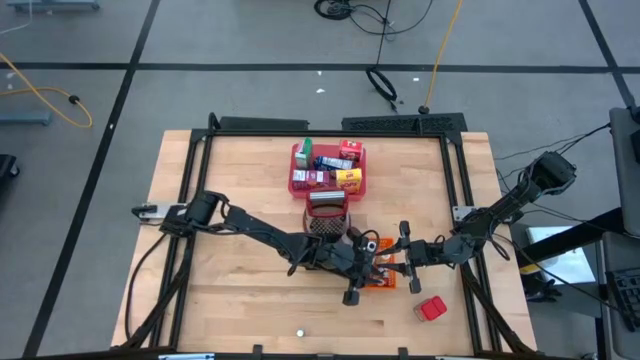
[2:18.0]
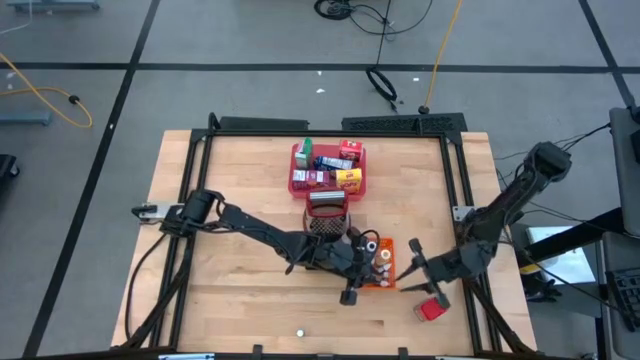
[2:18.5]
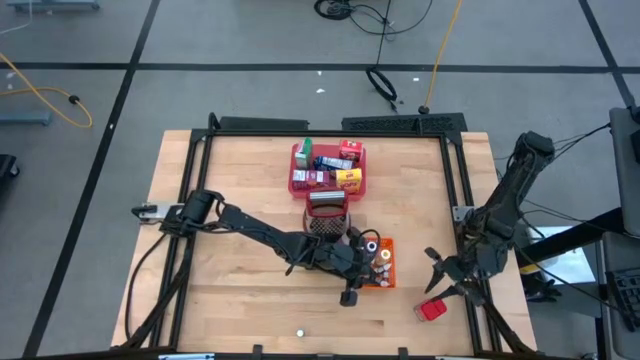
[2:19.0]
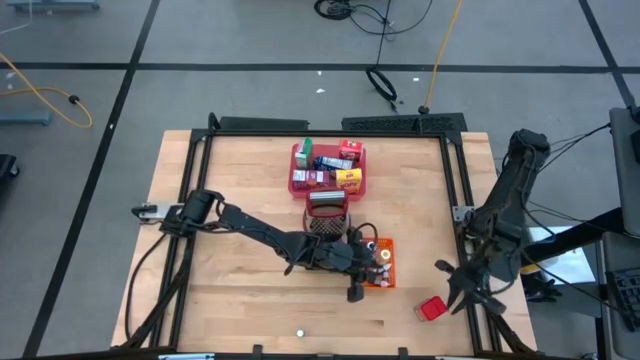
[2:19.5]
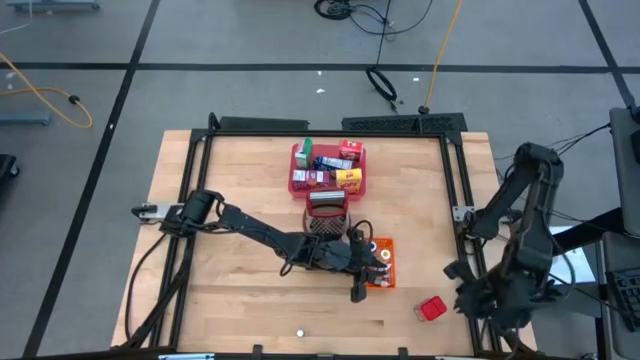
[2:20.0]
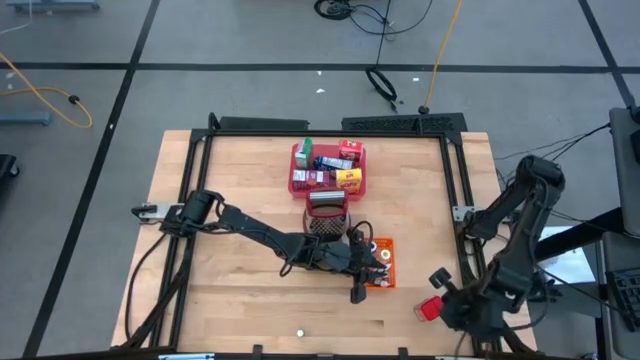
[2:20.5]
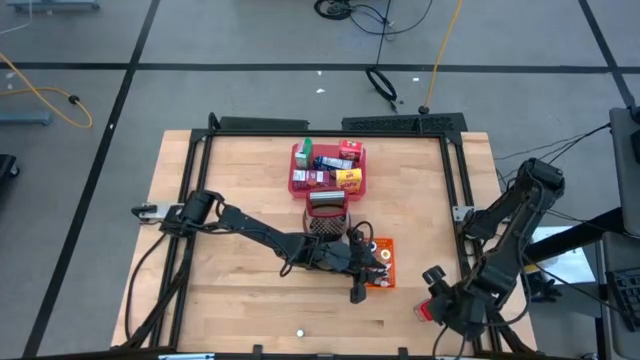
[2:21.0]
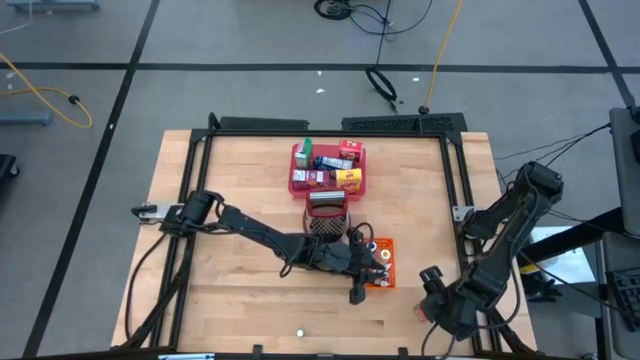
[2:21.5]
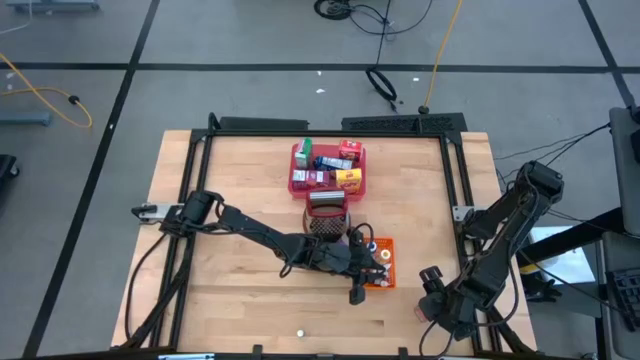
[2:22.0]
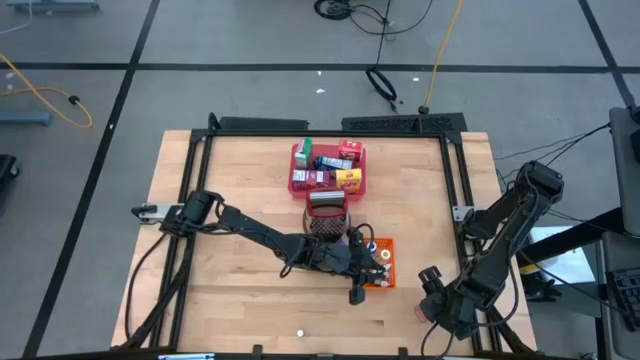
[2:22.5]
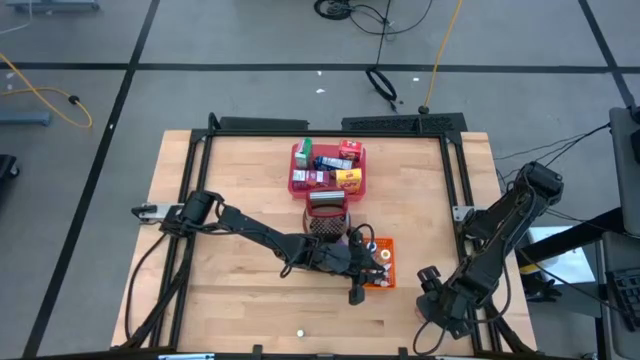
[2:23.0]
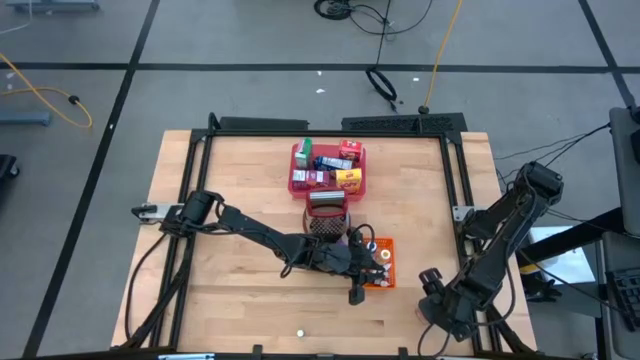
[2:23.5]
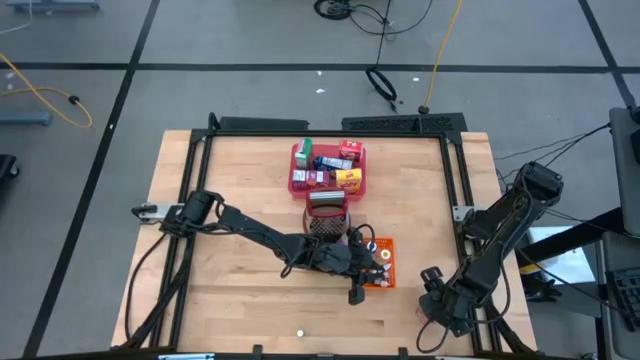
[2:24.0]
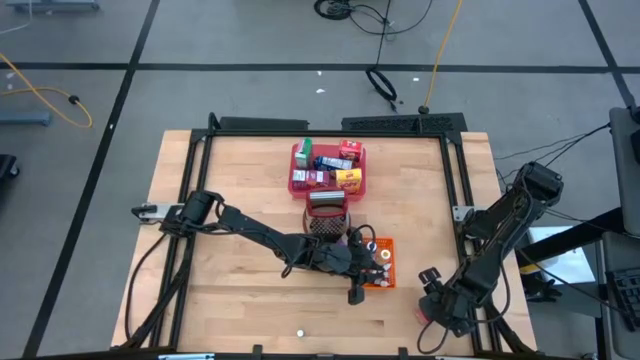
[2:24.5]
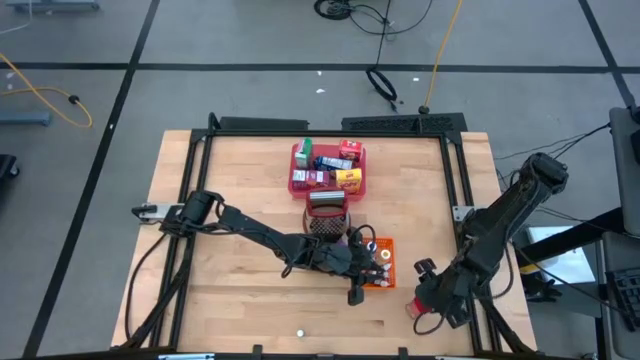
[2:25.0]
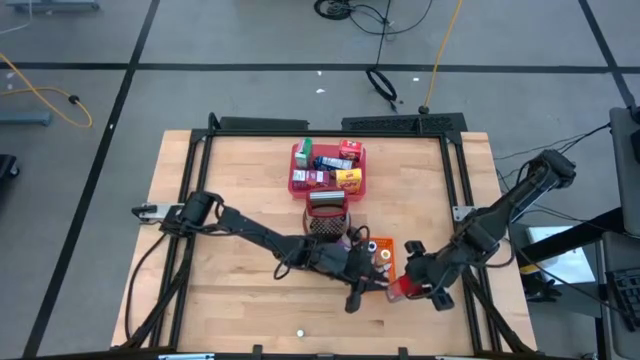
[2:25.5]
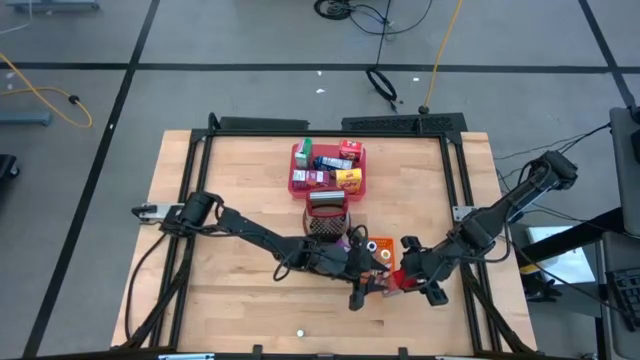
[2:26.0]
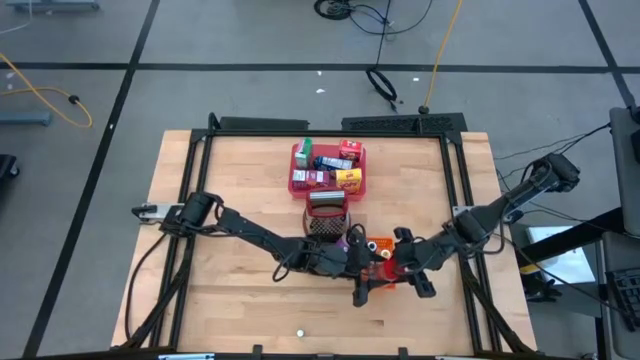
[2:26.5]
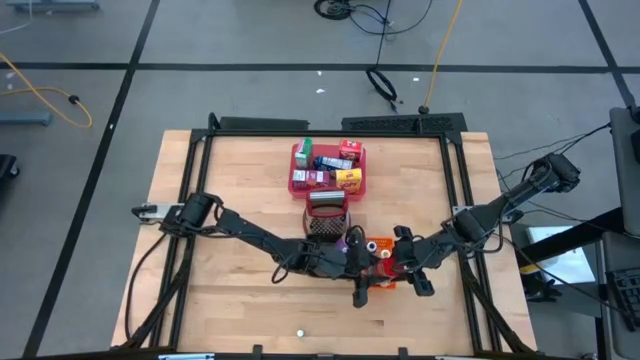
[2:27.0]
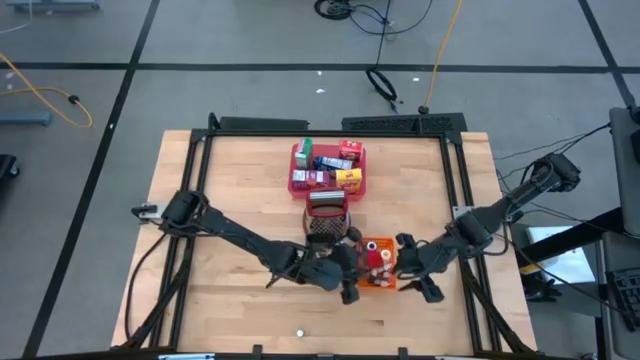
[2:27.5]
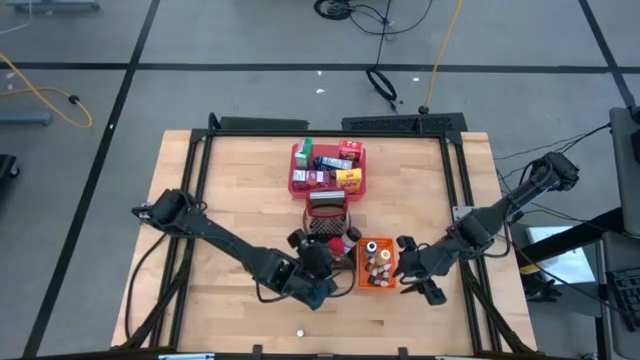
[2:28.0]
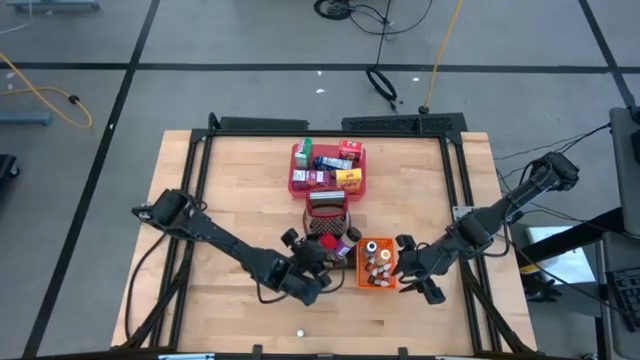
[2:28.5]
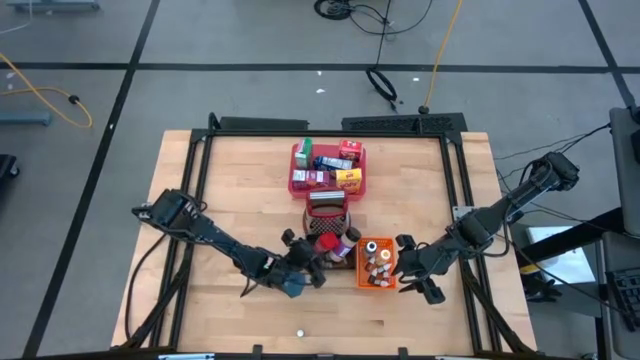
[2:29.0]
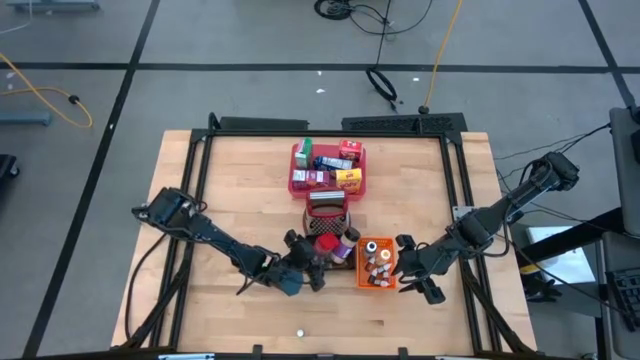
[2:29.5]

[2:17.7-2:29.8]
Task: Pick & Place Kitchen Items
Put the red seasoning can into the black bin

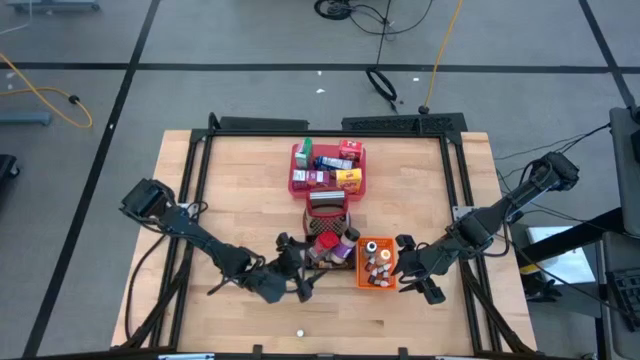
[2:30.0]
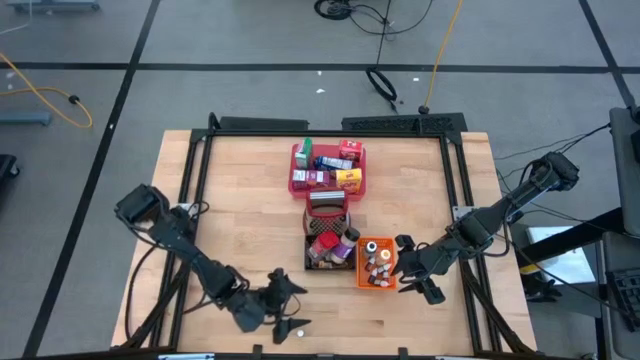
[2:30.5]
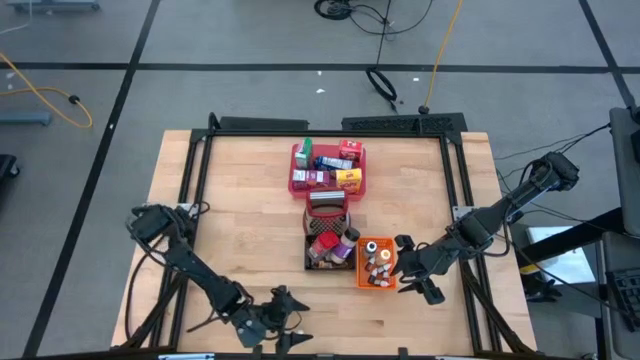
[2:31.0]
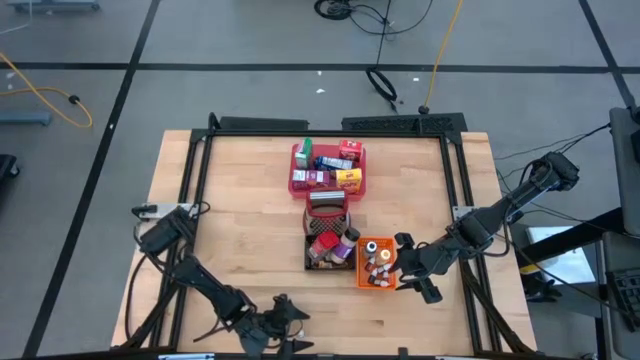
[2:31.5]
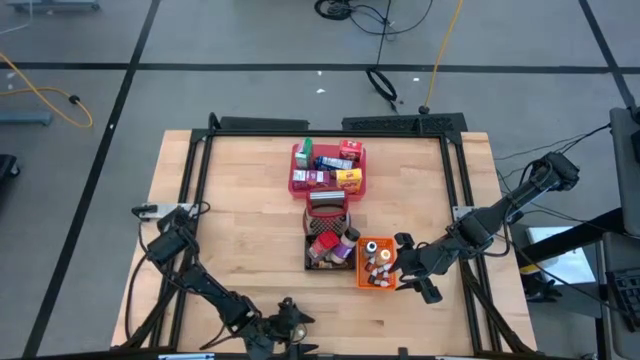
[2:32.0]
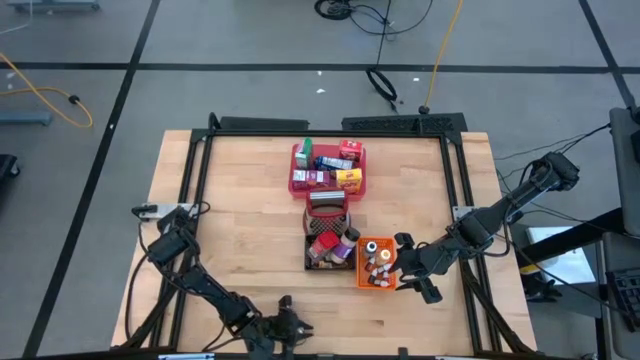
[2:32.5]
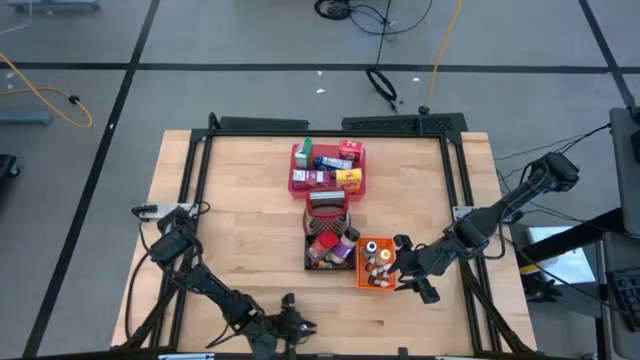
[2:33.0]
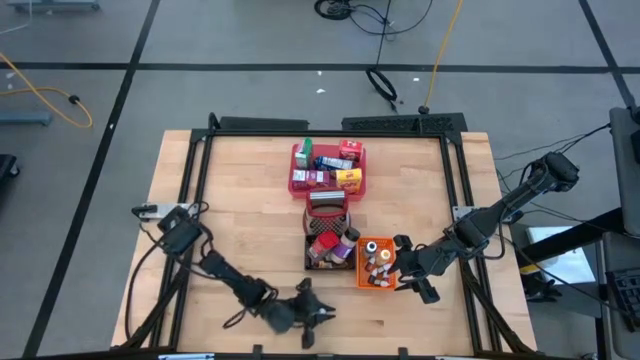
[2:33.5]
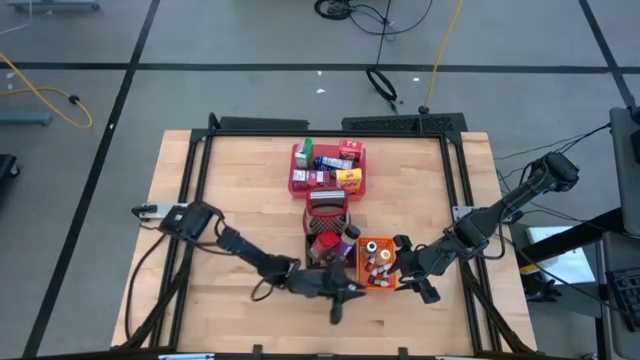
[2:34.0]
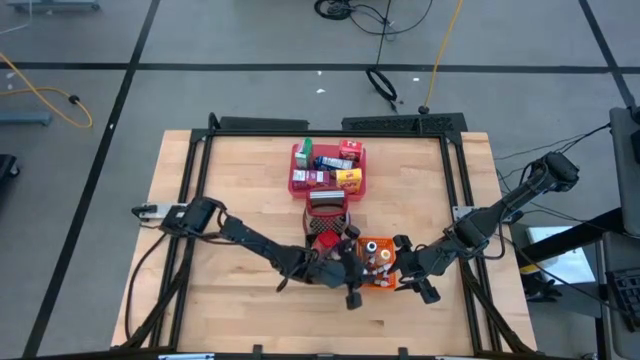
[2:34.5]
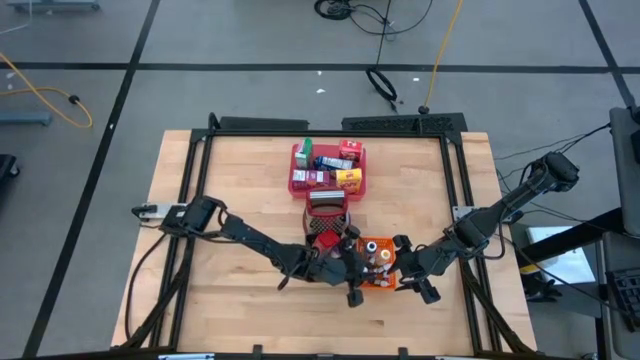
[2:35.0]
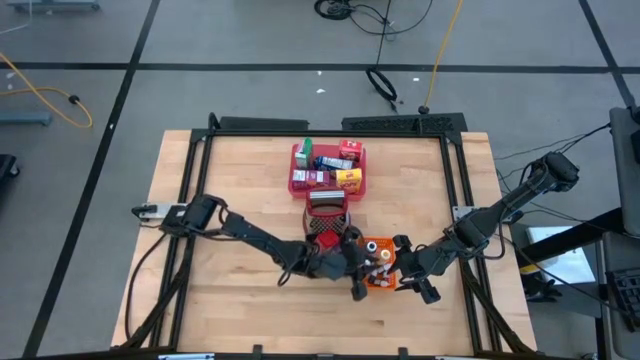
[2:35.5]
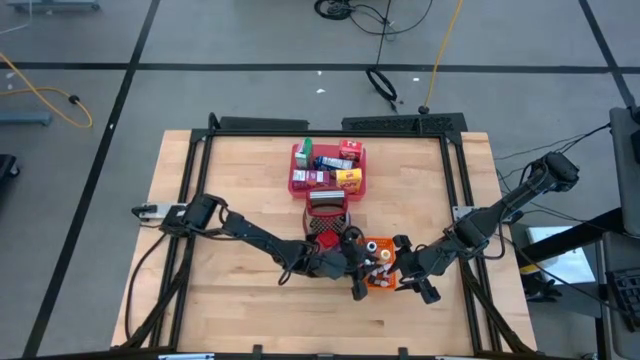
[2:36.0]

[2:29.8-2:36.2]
Put the brown food coloring bottle into the orange bin

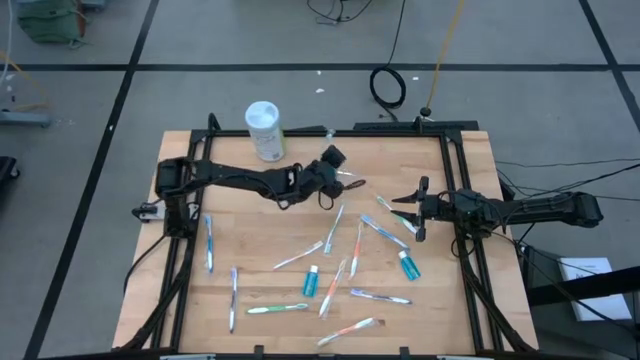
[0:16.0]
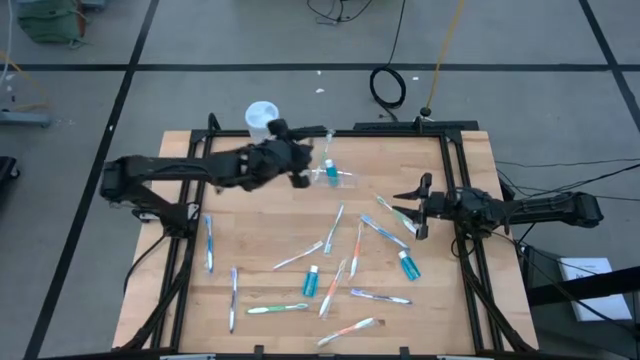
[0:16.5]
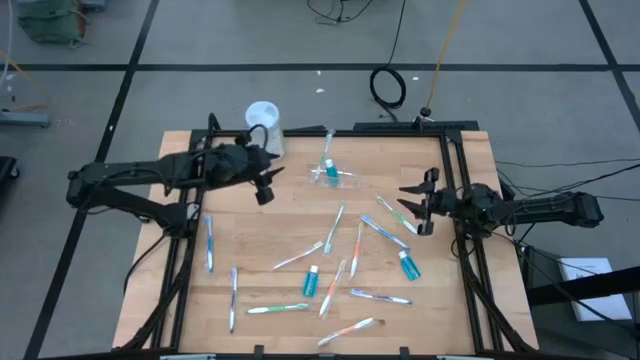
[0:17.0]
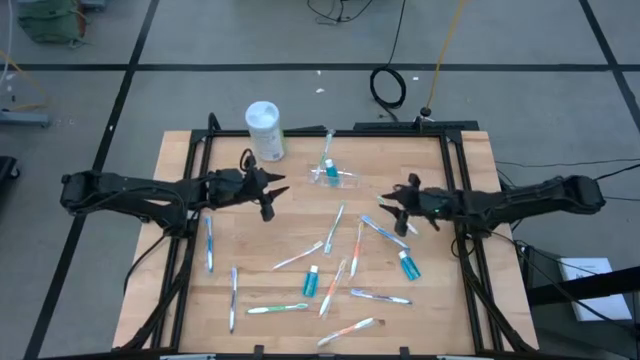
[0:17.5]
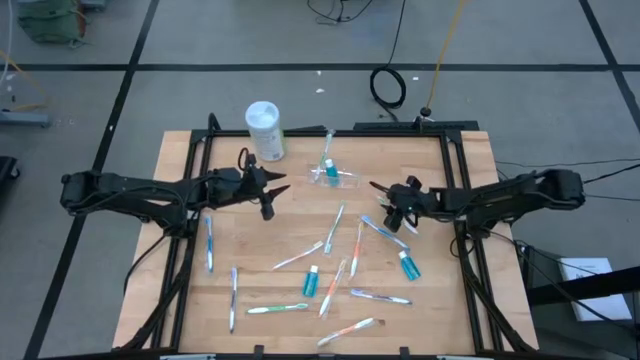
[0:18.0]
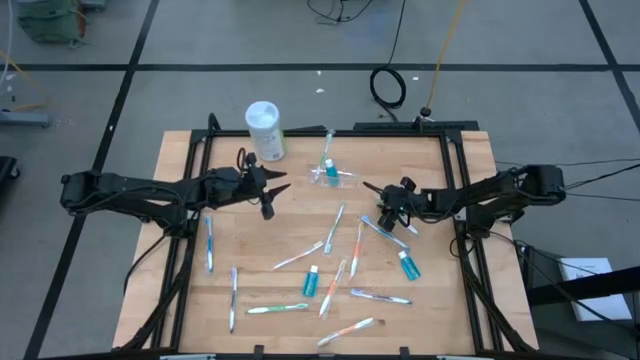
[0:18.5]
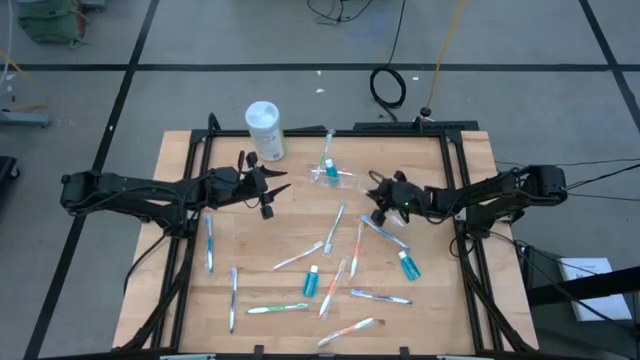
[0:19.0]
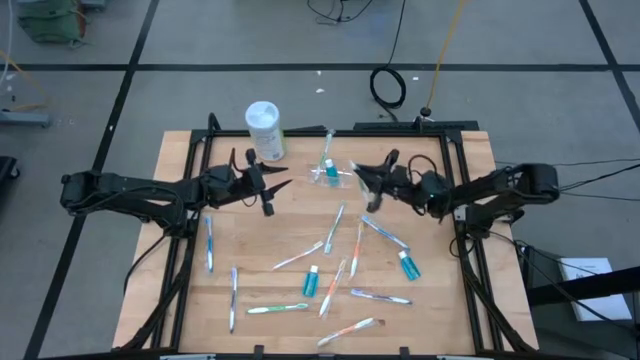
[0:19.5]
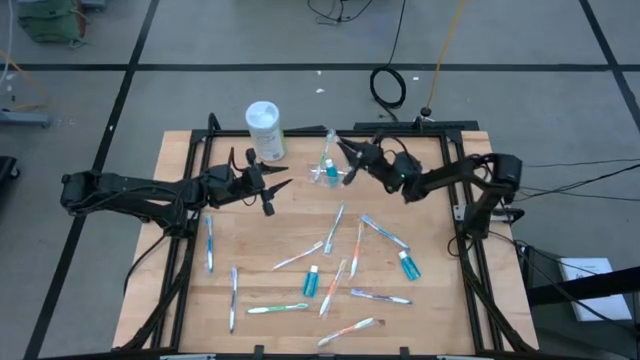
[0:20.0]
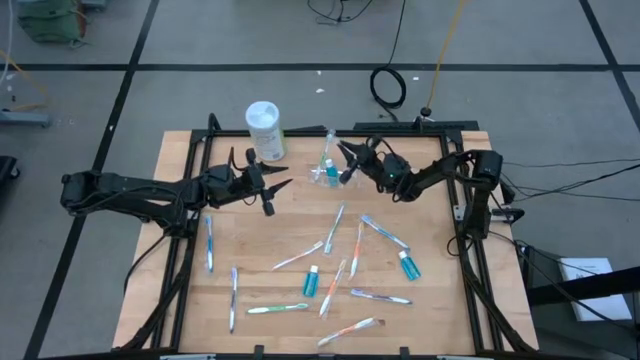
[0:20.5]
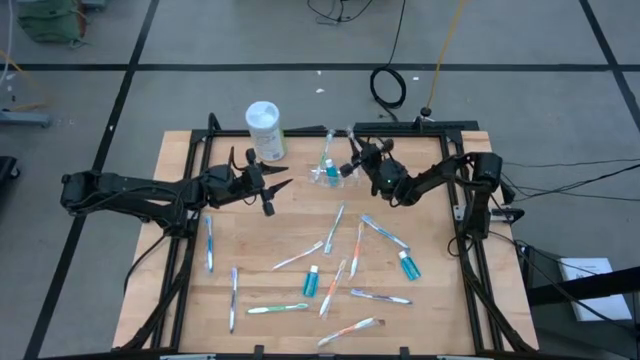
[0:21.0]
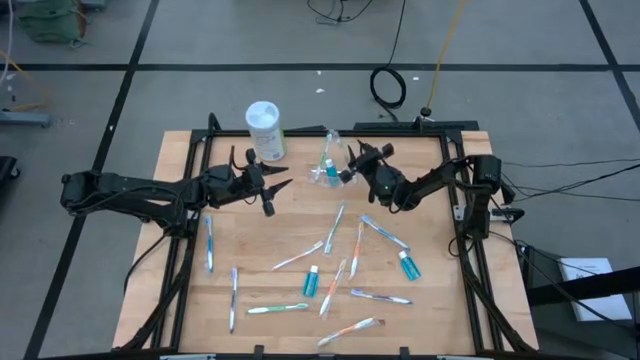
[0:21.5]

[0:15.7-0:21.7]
Task: Pick & Place toothbrushing station
Put the green toothbrush into the transparent organizer
